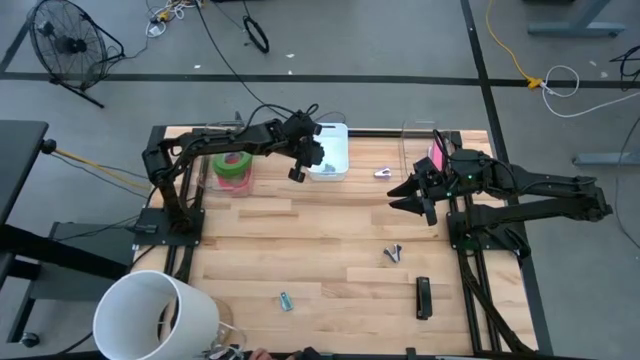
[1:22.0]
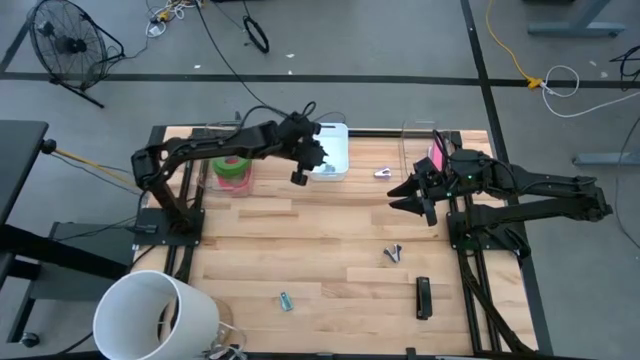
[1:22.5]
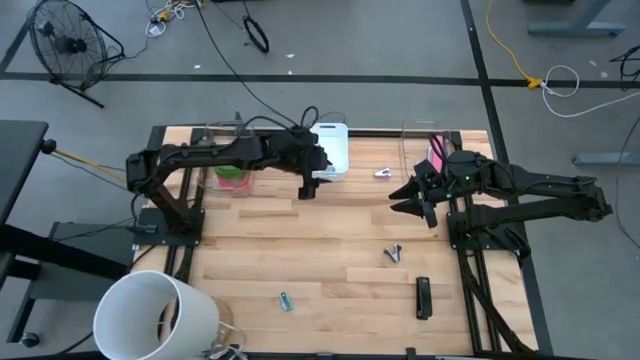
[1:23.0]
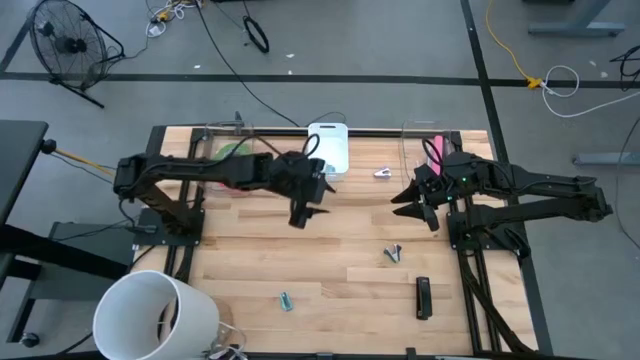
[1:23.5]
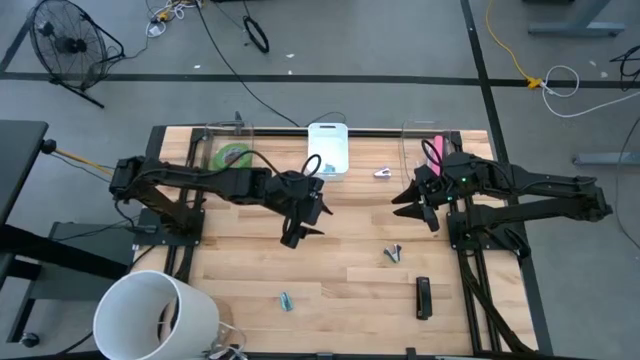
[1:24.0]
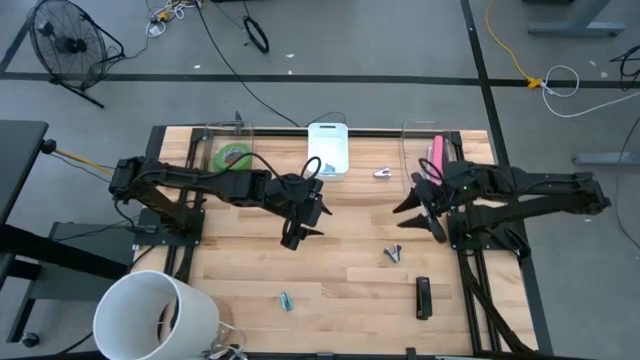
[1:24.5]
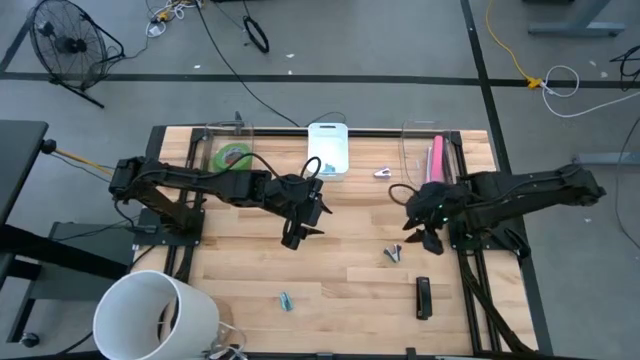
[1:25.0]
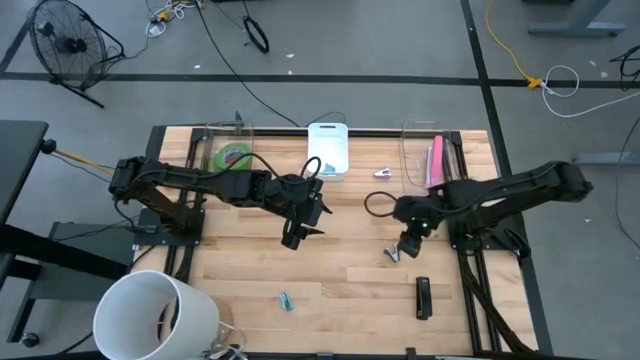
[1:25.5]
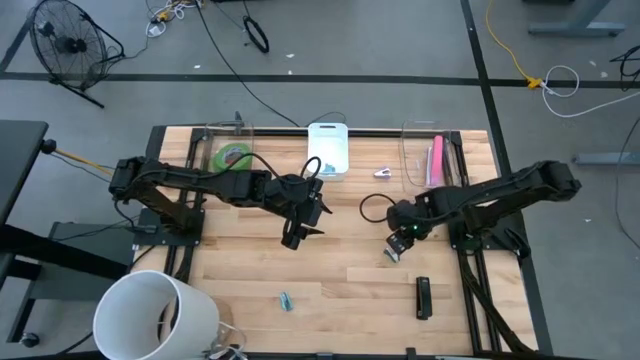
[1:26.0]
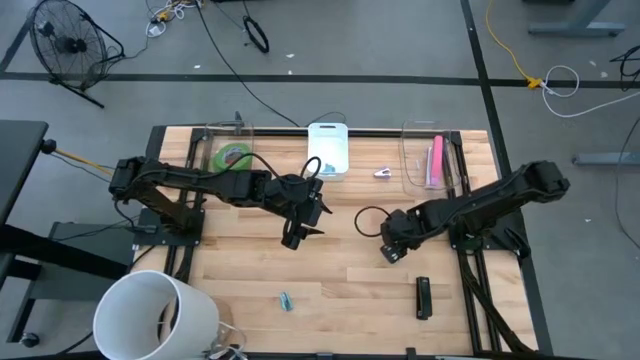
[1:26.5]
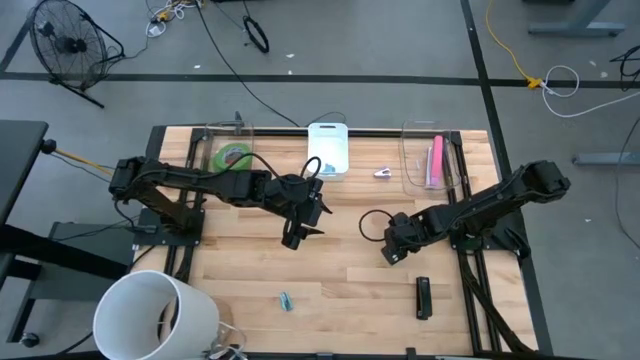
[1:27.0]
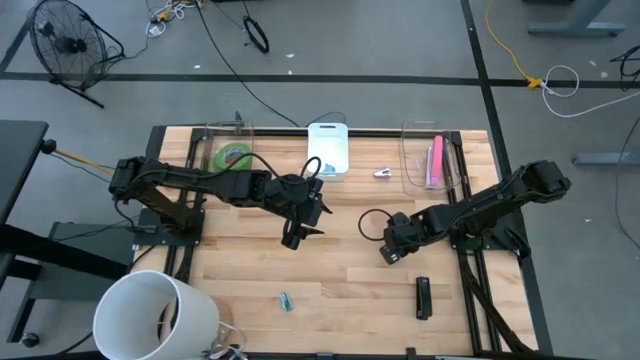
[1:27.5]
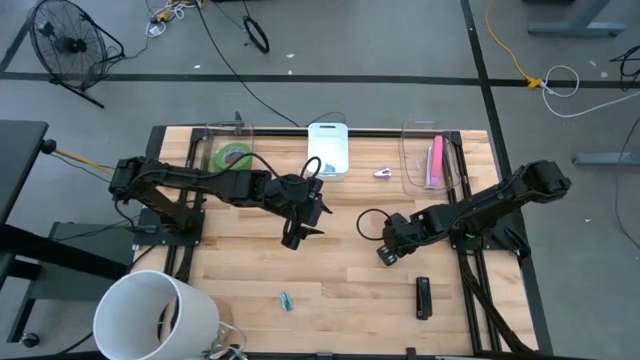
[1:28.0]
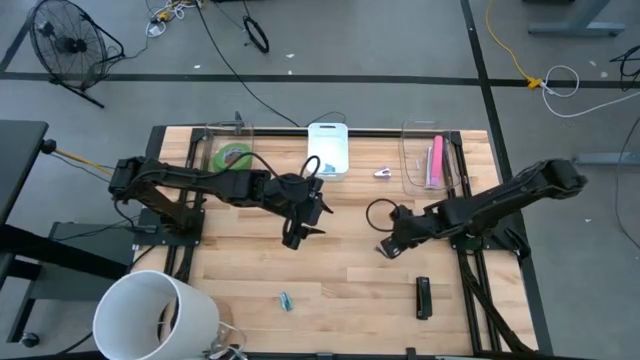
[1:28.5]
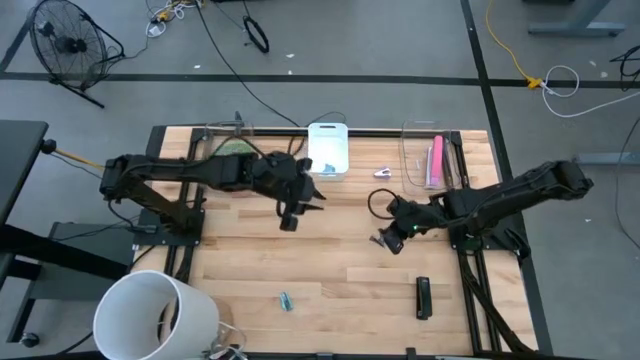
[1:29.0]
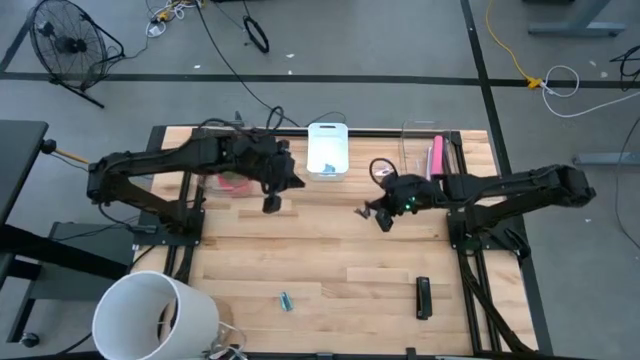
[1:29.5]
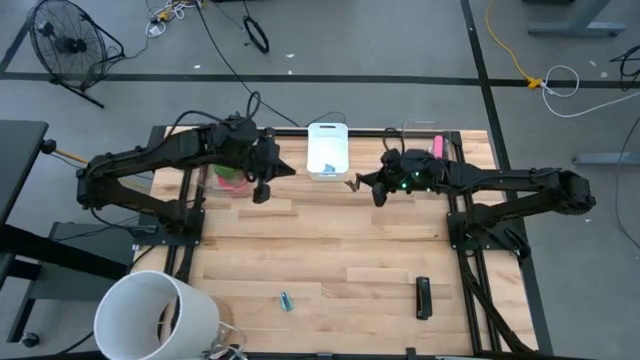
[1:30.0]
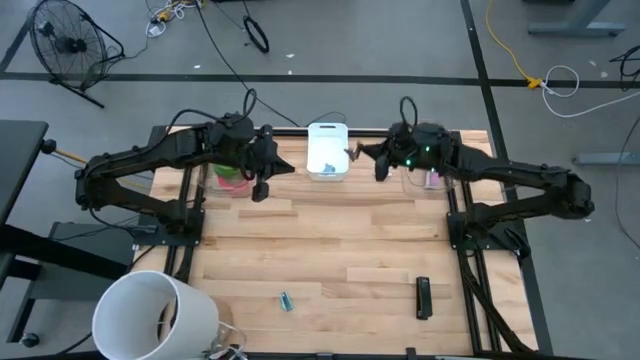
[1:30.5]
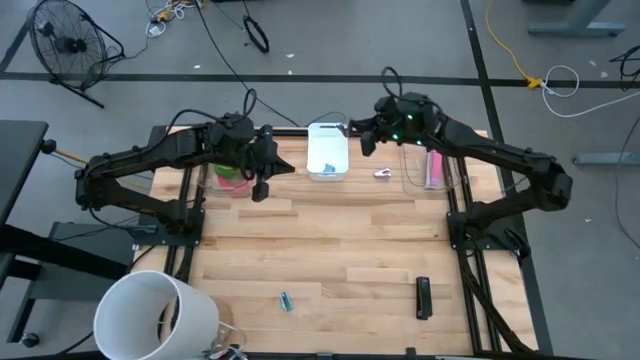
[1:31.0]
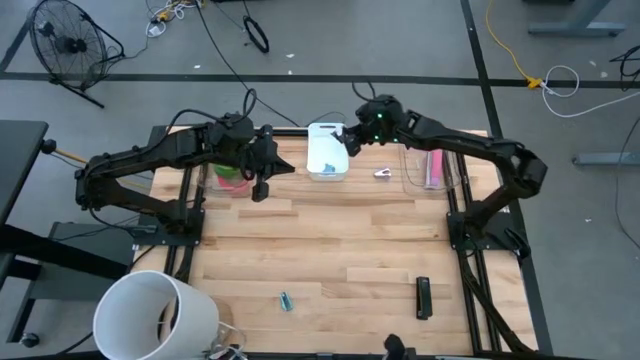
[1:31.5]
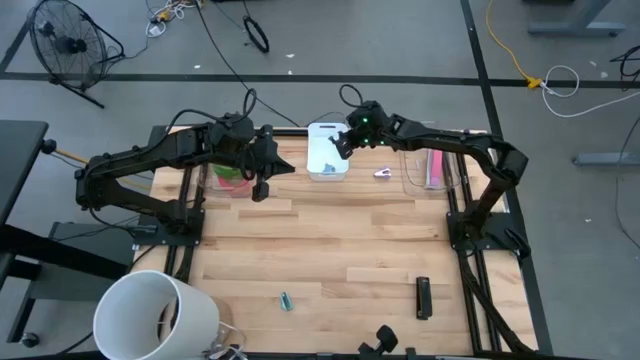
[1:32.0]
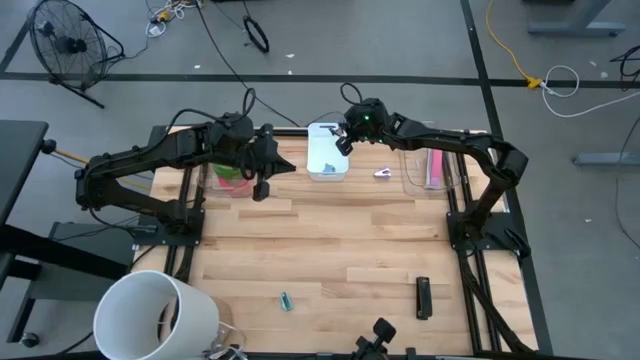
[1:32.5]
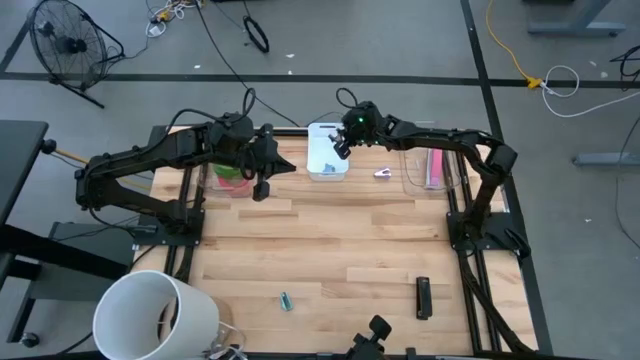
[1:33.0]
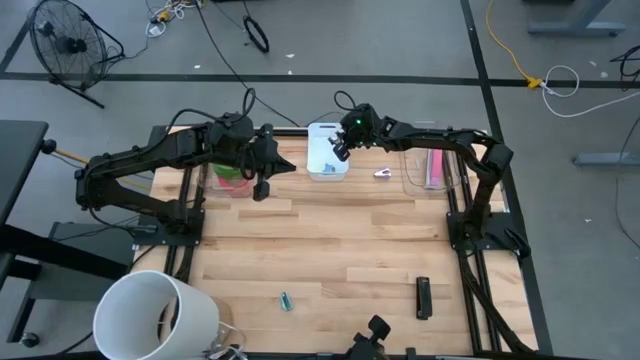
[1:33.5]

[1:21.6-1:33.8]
Task: Pick and place Stapler, Stapler remover, tape
Put the black staple remover into the white bin

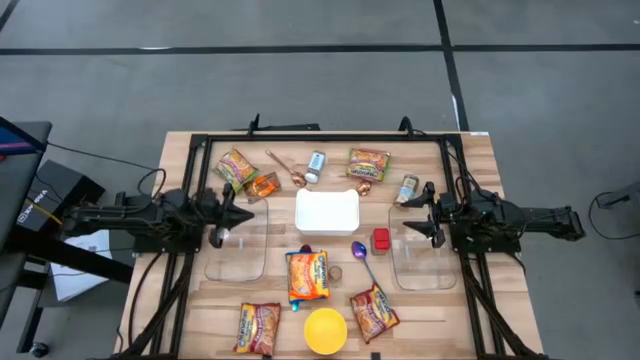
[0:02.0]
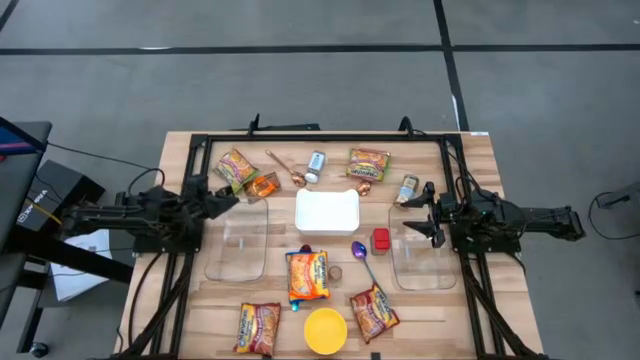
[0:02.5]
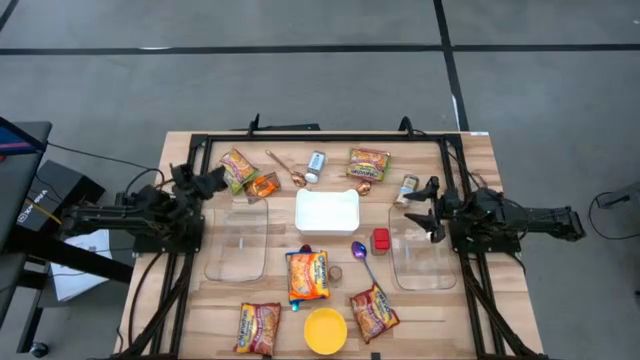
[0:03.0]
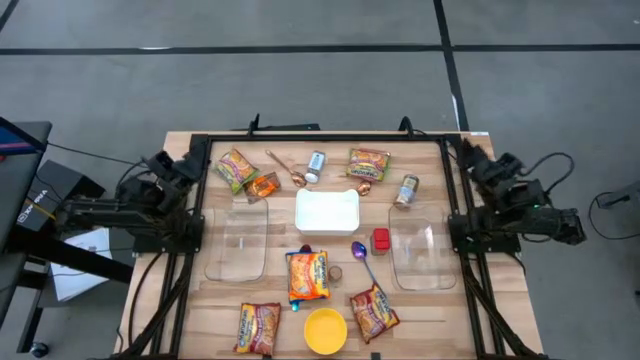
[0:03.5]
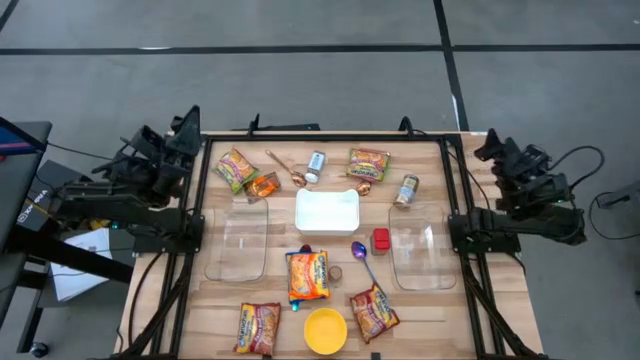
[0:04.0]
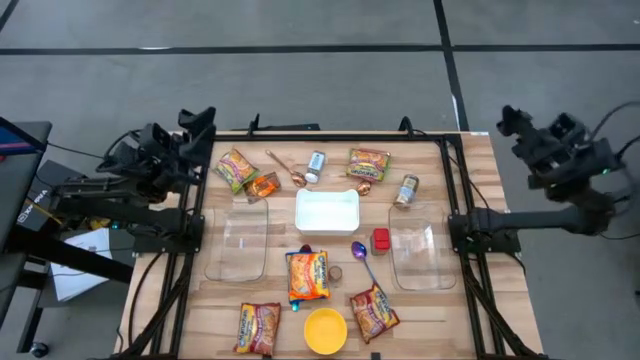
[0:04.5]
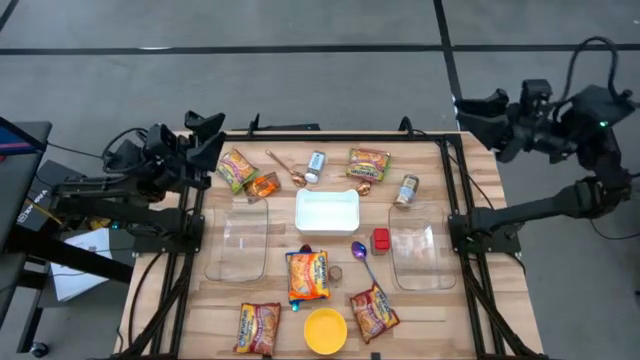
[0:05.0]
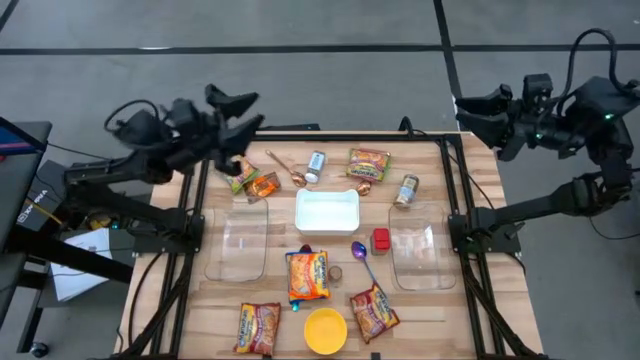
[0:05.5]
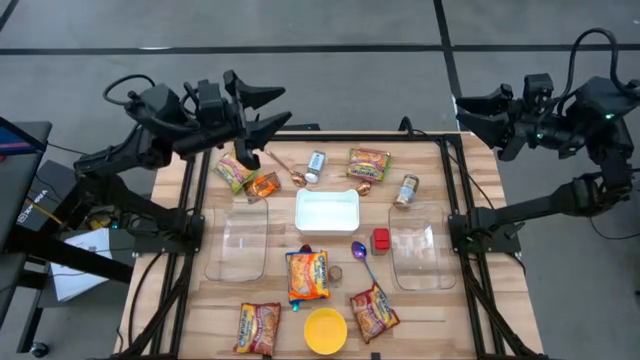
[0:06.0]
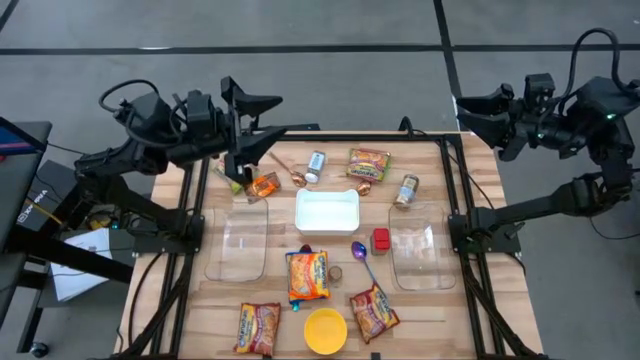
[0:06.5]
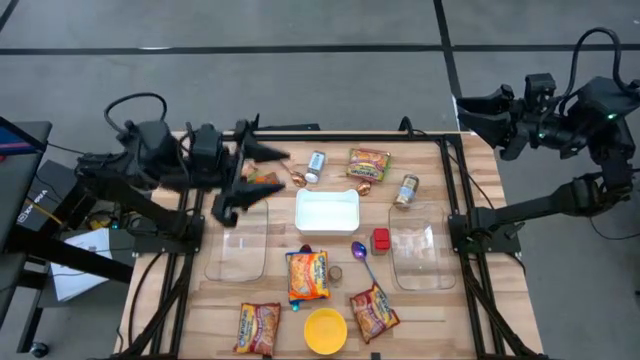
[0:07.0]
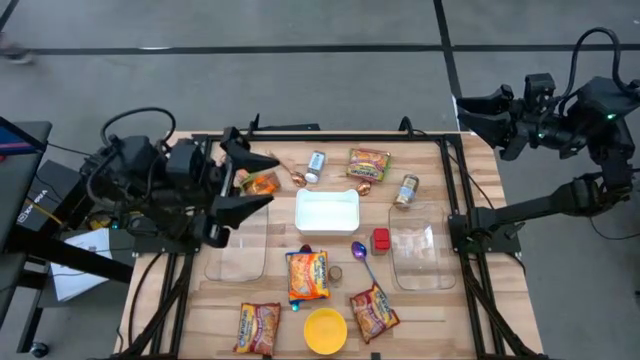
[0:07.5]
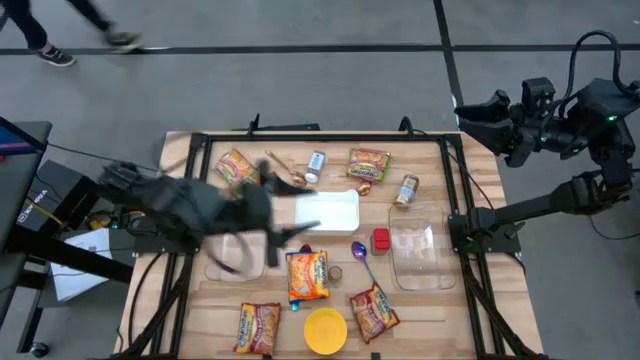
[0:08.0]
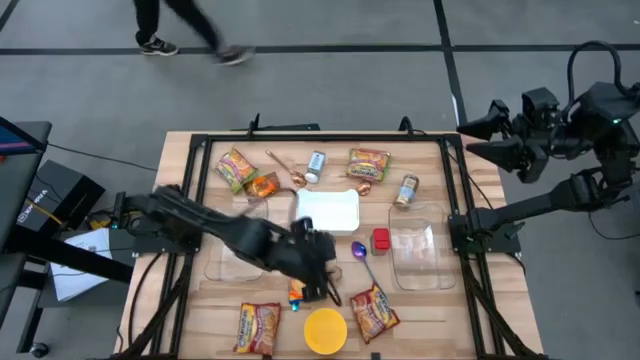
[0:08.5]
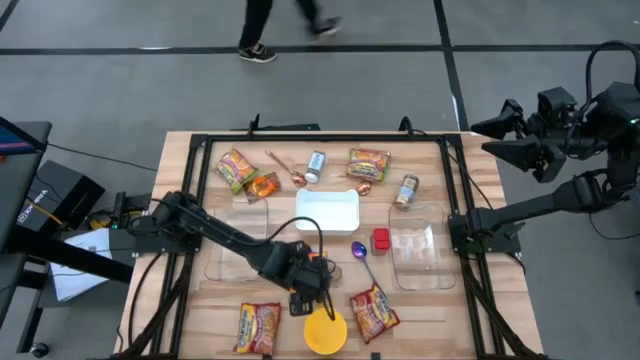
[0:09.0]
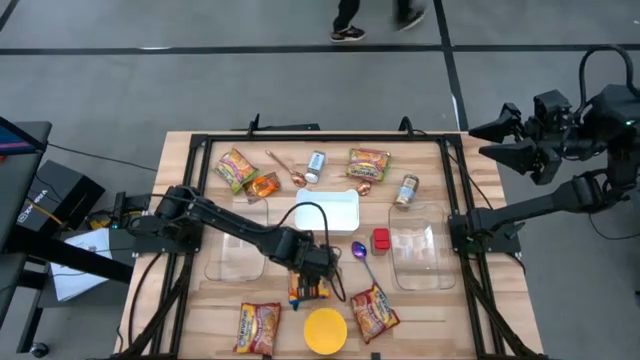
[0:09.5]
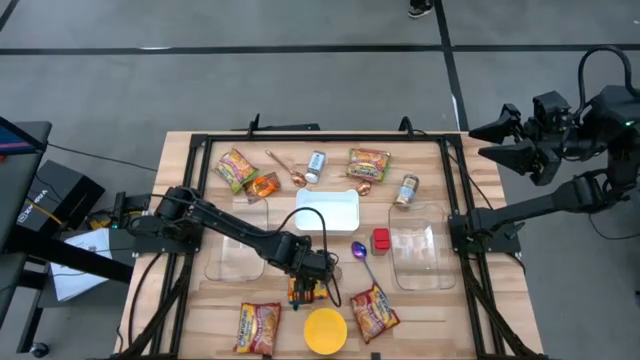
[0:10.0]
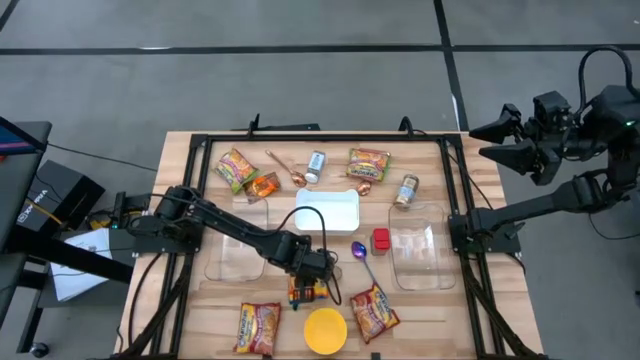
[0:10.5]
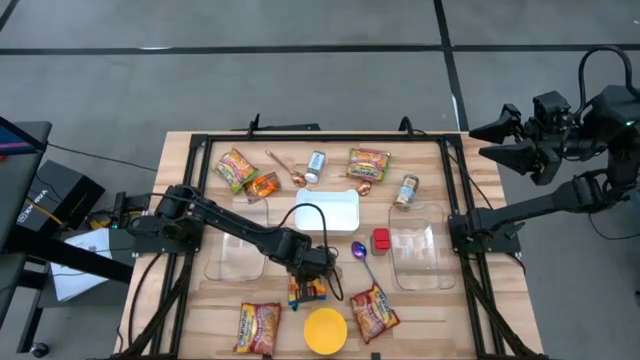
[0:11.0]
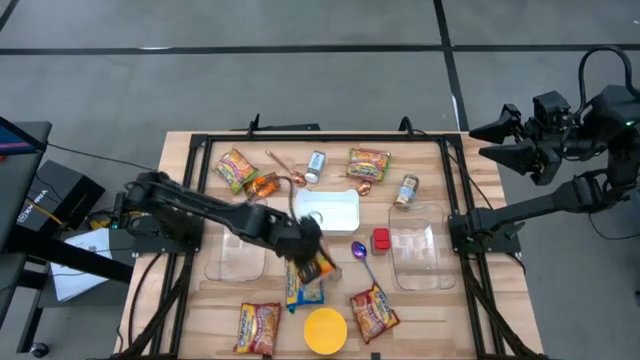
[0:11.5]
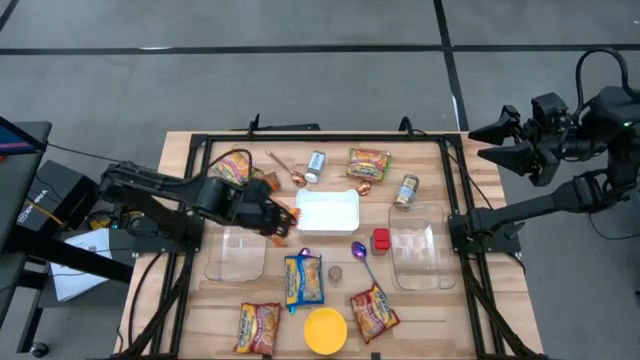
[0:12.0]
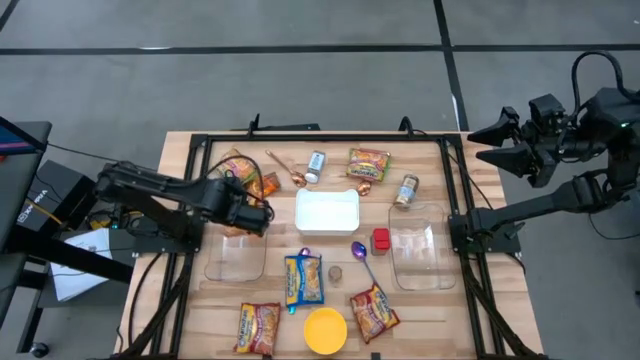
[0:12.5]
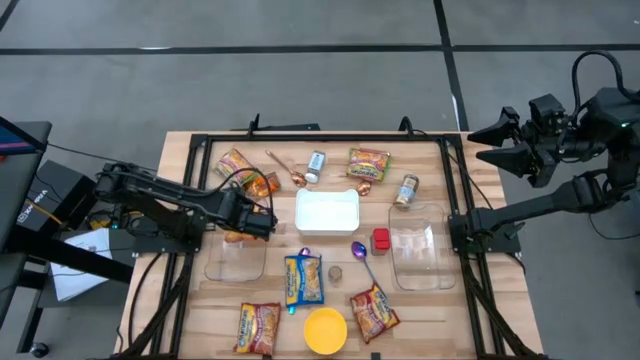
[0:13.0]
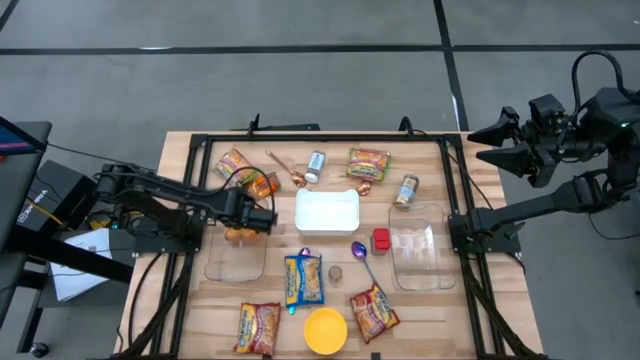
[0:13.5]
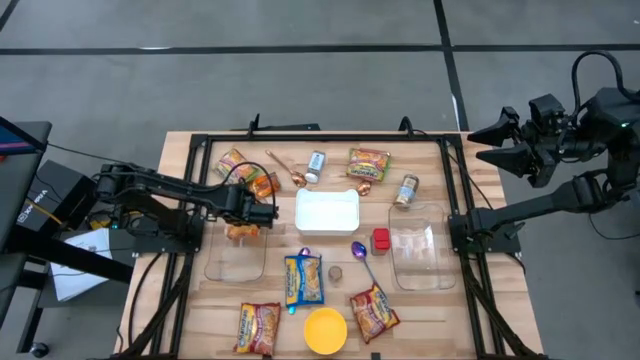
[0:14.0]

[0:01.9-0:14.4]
Task: Pick & Place Food Item
Put the orange noodle pack into the left transparent bin
